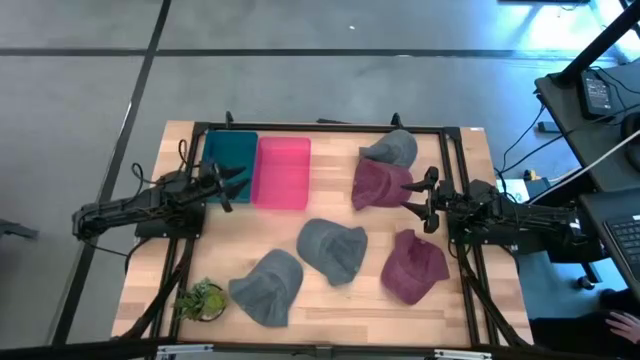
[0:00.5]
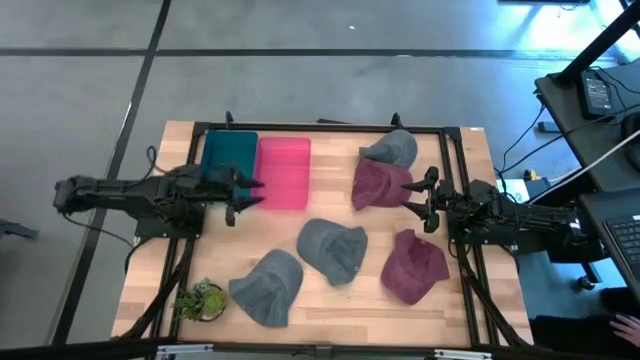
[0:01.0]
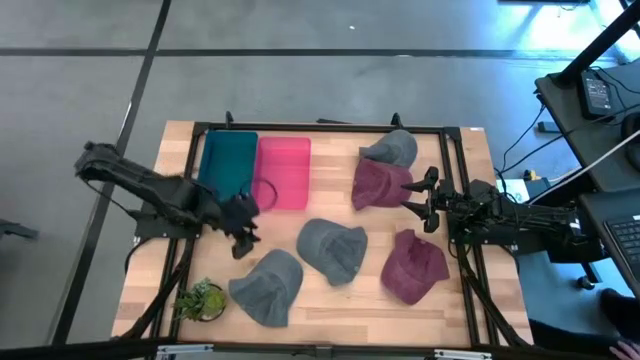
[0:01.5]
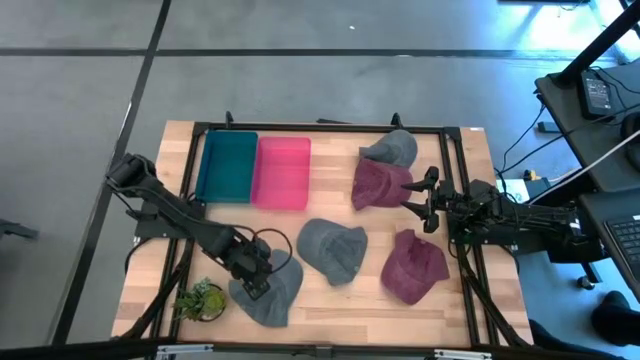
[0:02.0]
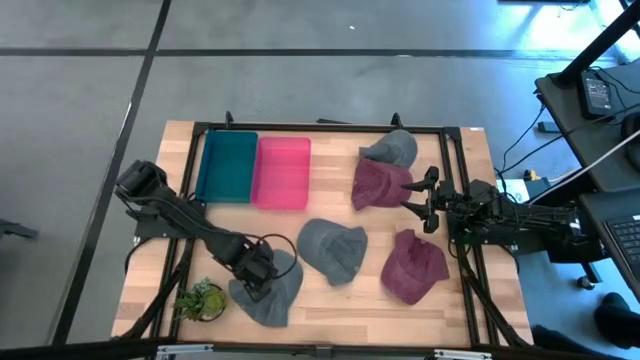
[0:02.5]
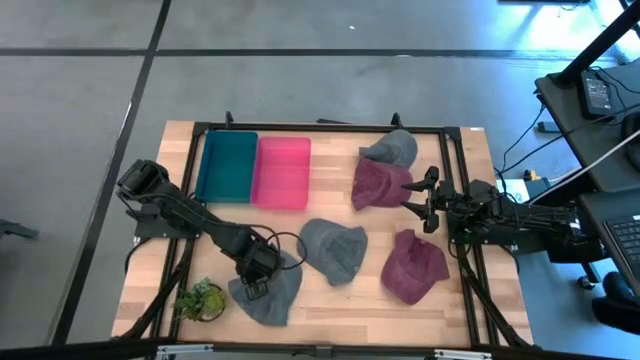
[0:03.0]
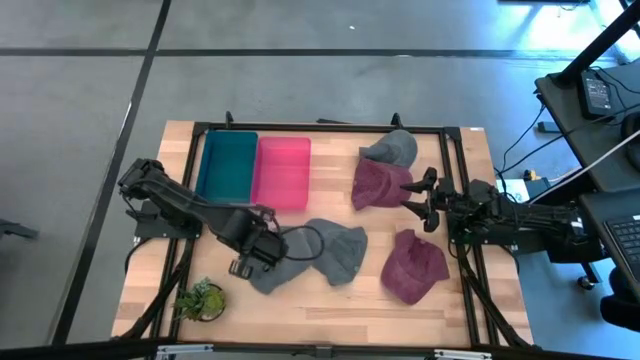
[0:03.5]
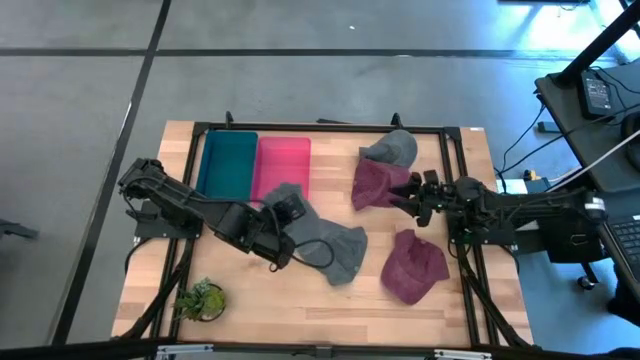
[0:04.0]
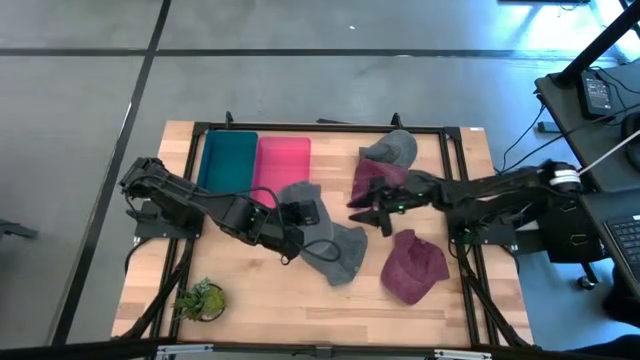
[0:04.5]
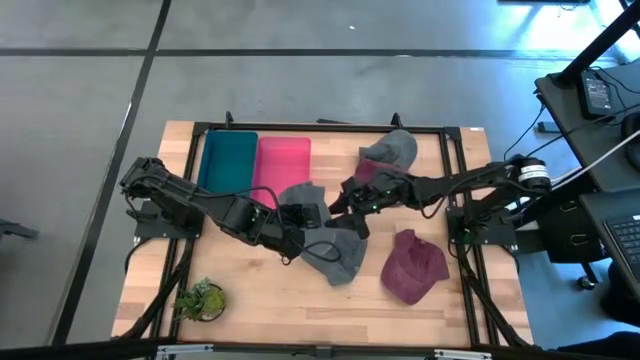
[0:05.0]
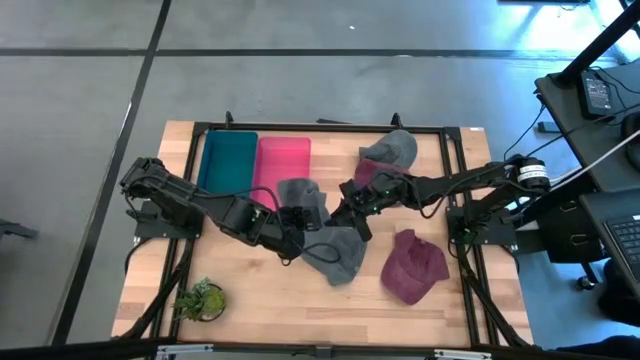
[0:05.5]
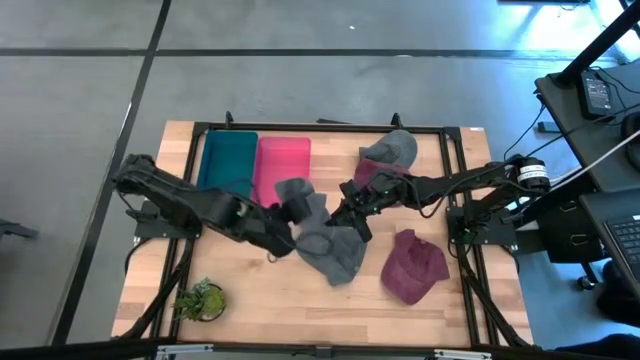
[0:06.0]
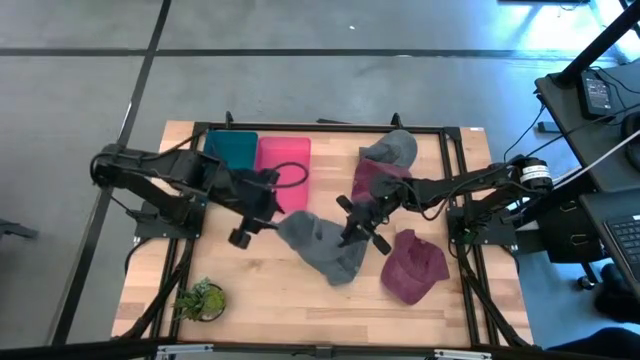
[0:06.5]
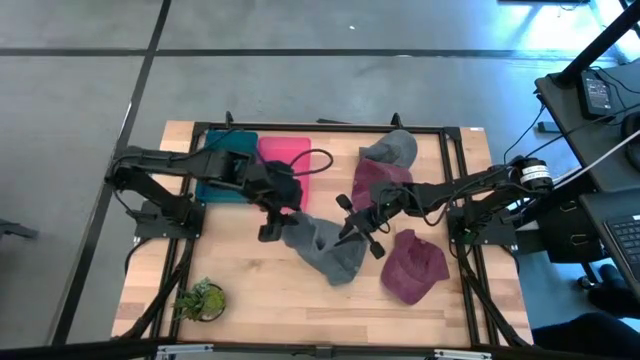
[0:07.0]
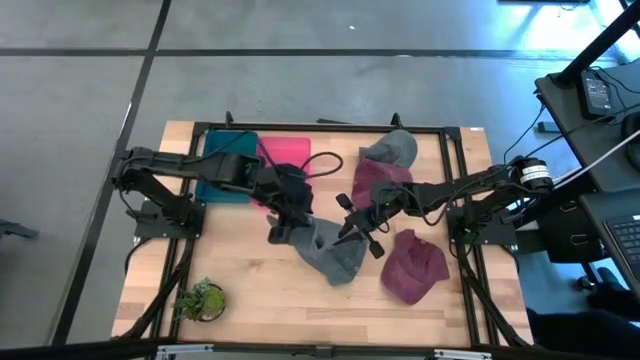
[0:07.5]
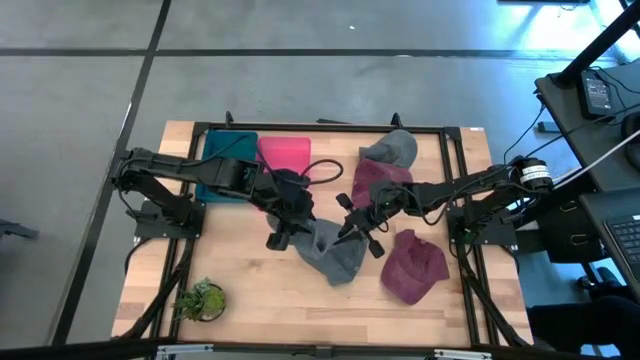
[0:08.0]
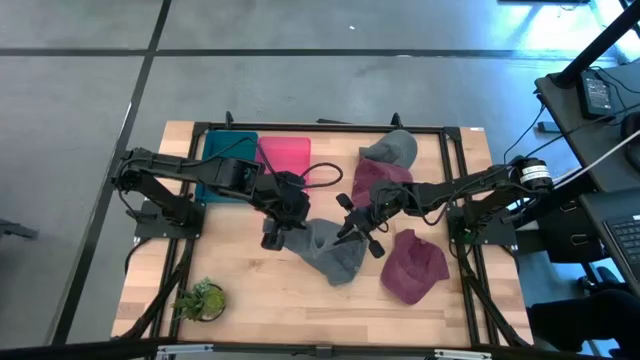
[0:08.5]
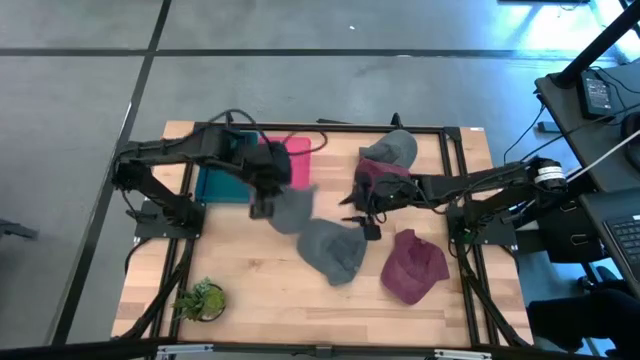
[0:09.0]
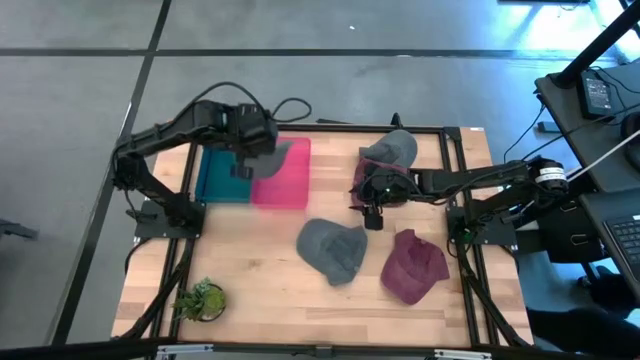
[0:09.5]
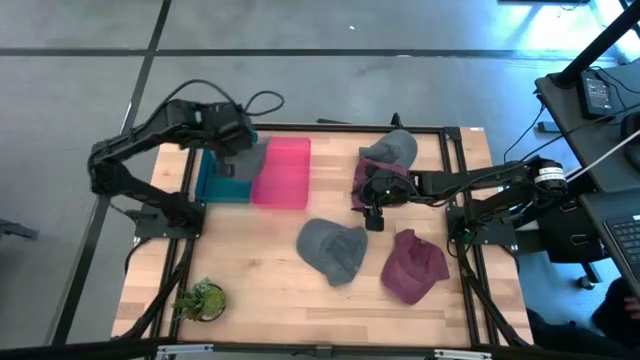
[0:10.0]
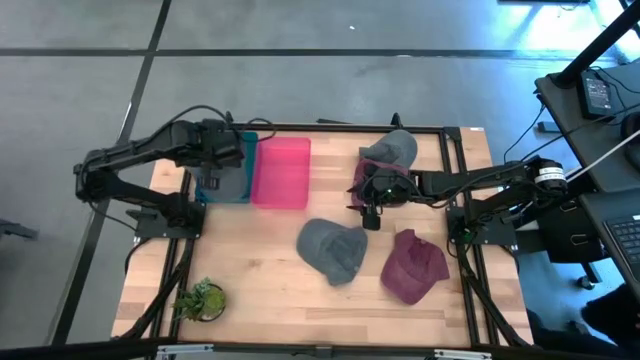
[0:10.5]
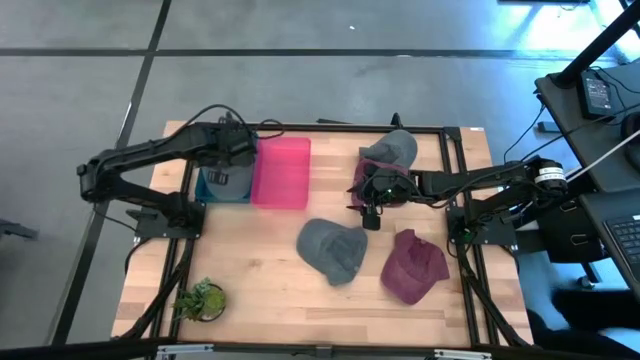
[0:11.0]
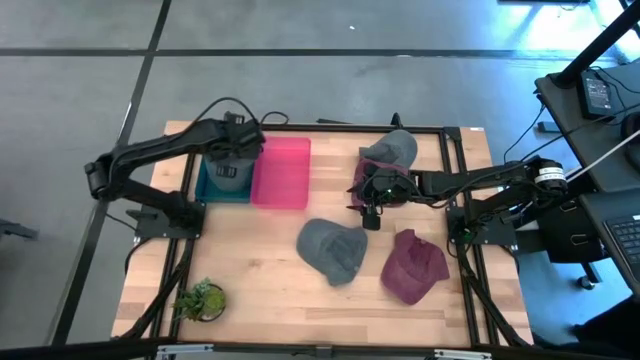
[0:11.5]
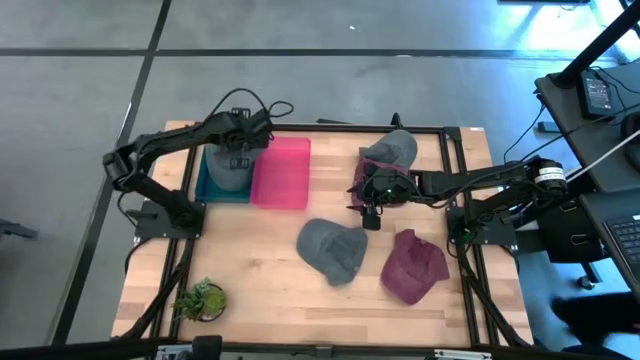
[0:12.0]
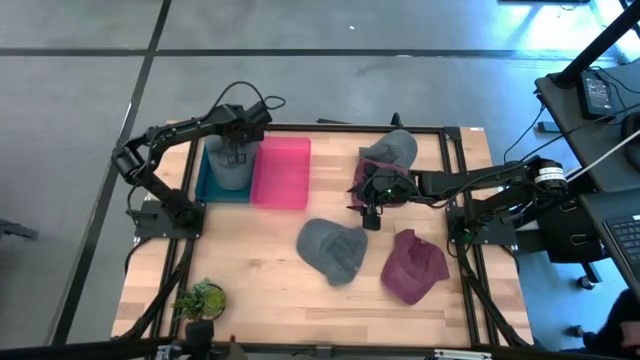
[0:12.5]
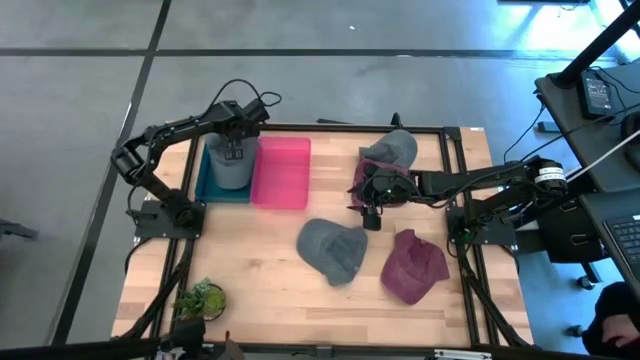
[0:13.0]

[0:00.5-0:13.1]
Task: Pick & Place hat
Put the bottom blue cap into the blue bin

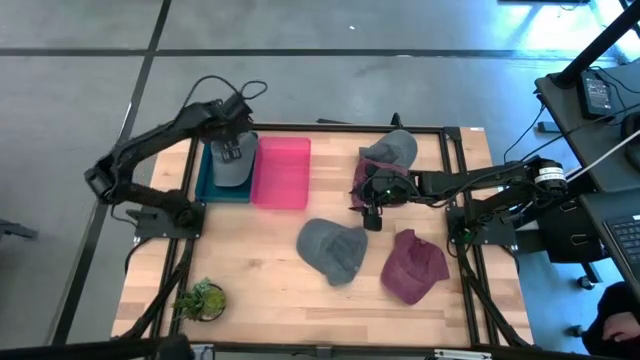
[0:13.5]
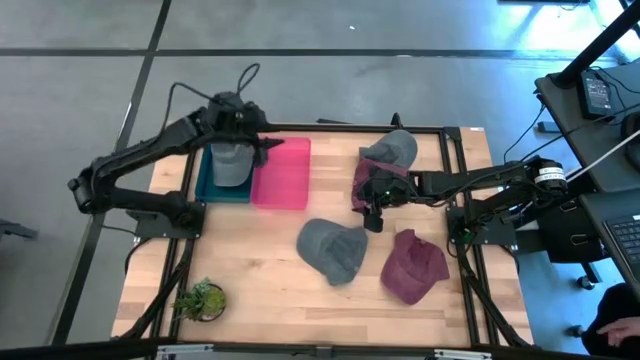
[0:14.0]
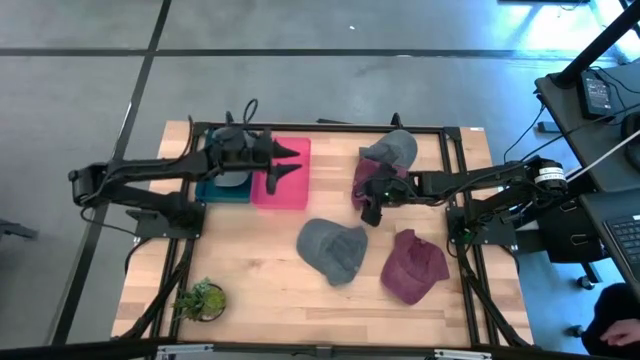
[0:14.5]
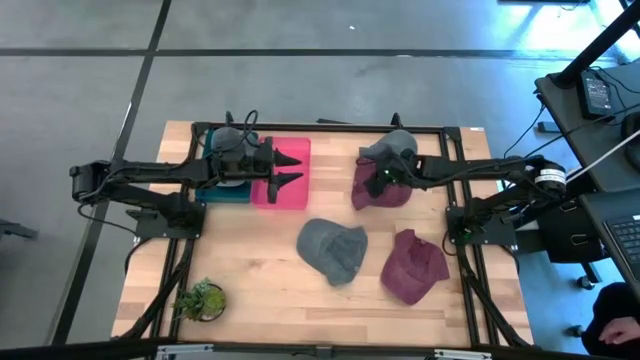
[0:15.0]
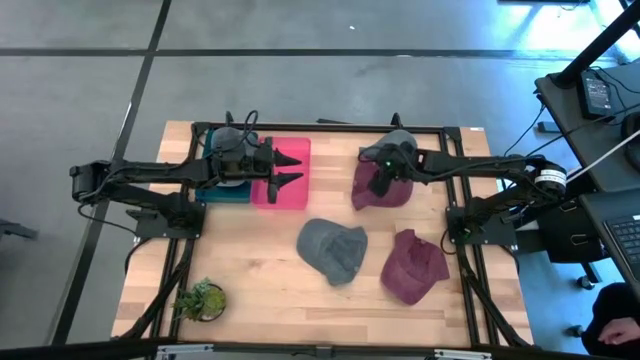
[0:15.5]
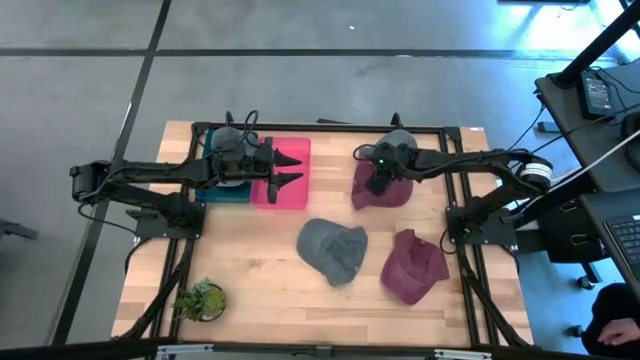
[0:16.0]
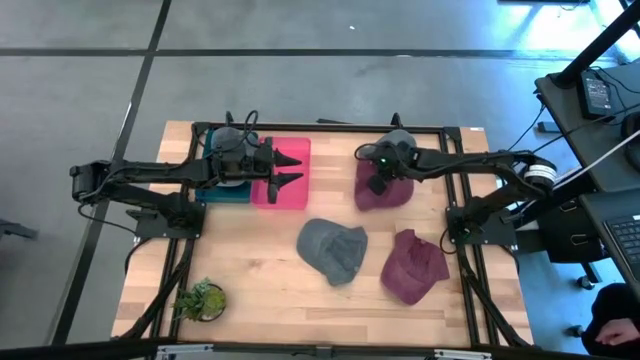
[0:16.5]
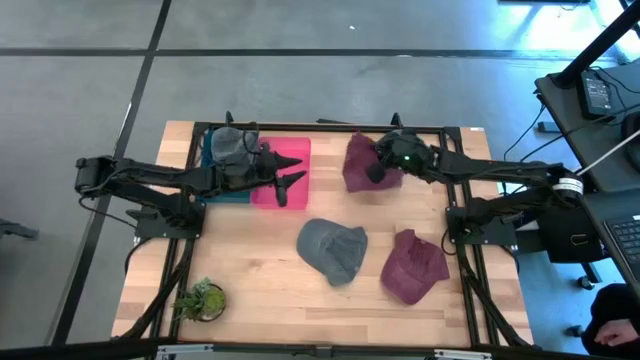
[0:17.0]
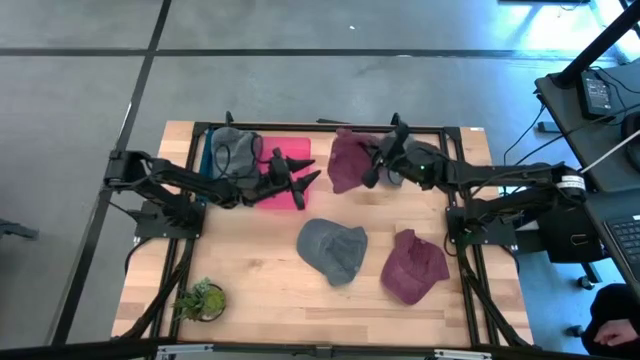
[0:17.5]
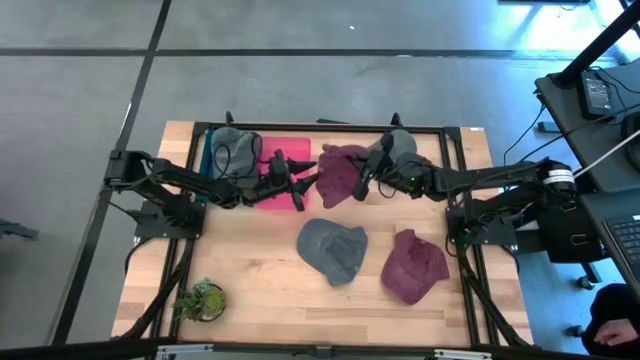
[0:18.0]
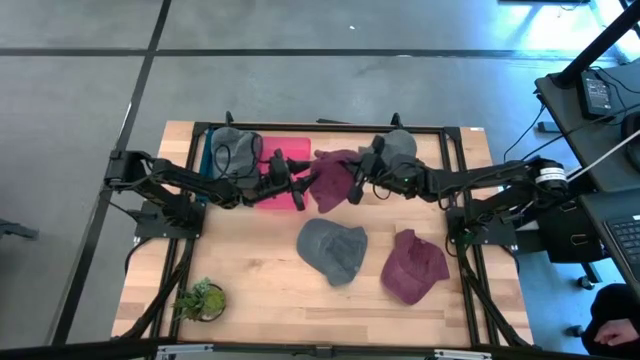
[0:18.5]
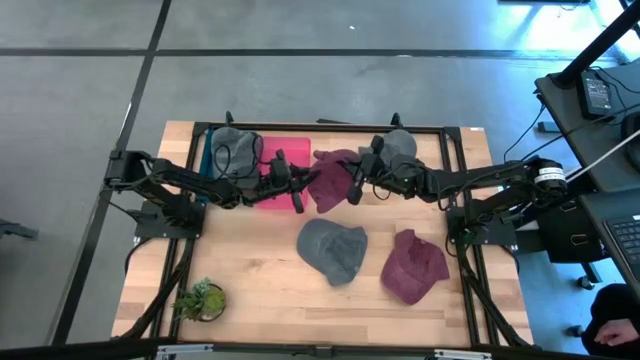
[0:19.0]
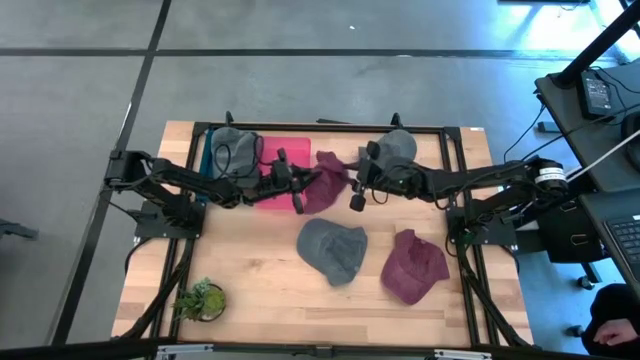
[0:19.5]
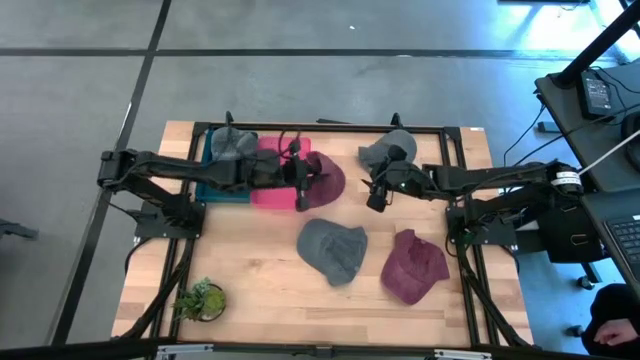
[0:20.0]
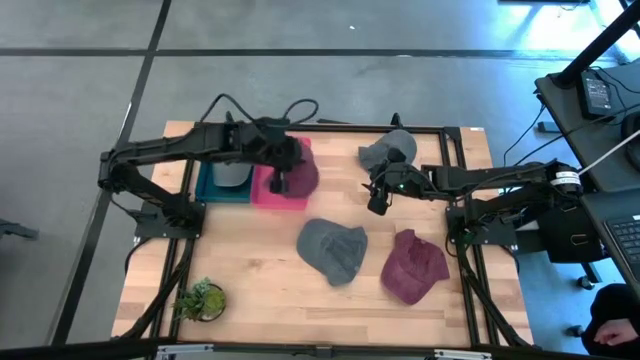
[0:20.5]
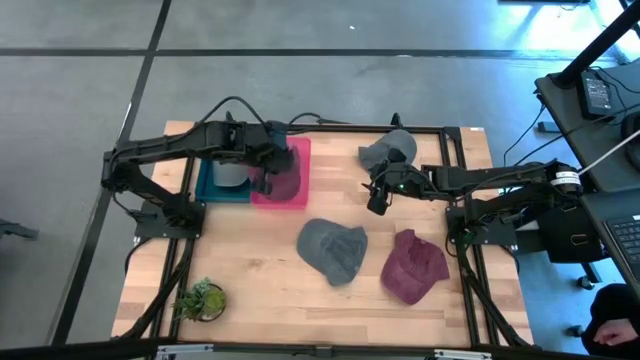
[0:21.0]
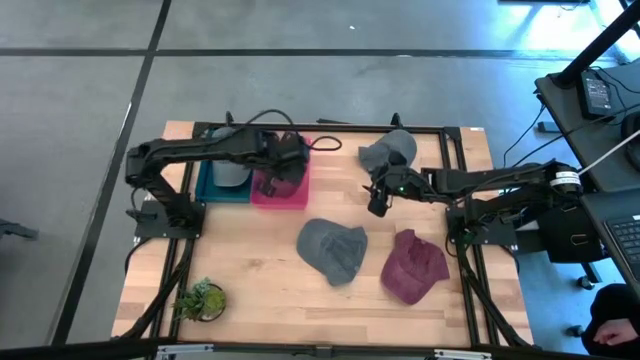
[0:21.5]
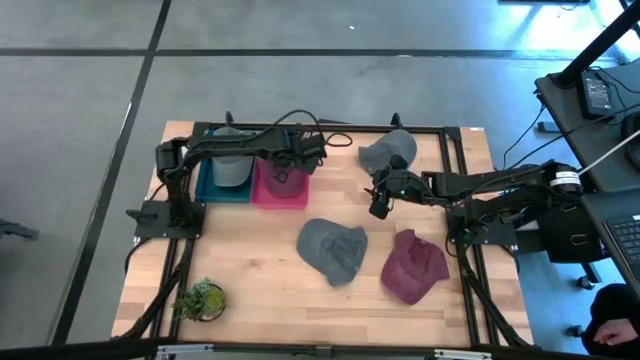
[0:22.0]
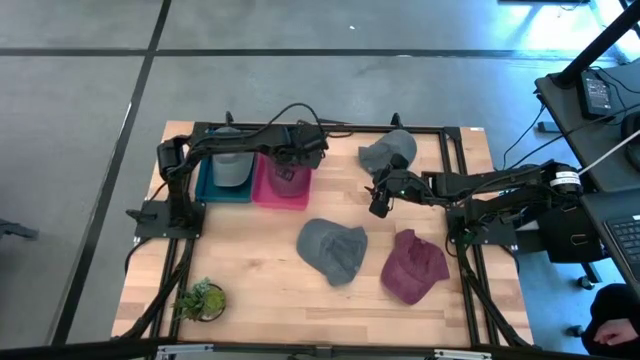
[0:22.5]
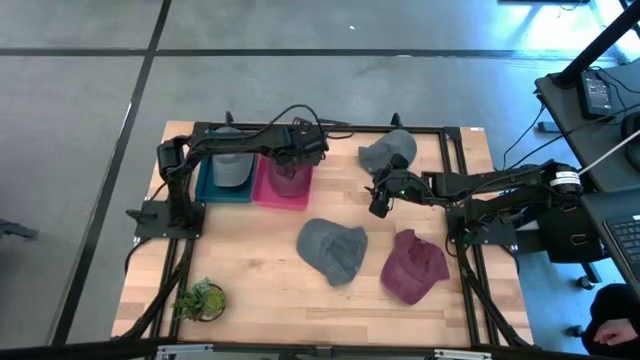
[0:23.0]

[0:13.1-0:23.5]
Put the top red cap into the pink bin
